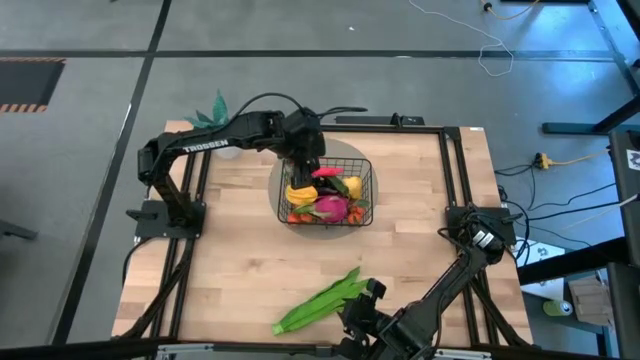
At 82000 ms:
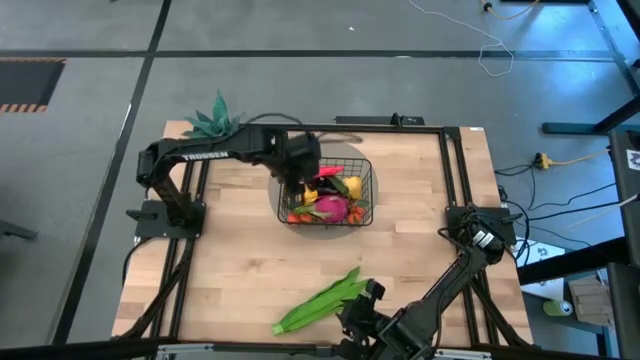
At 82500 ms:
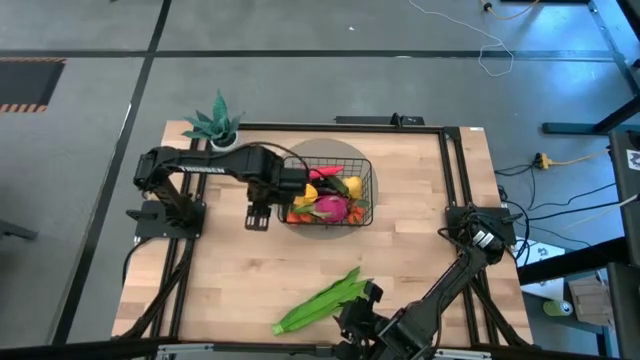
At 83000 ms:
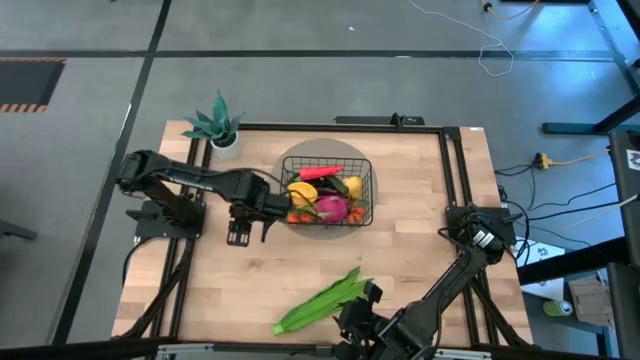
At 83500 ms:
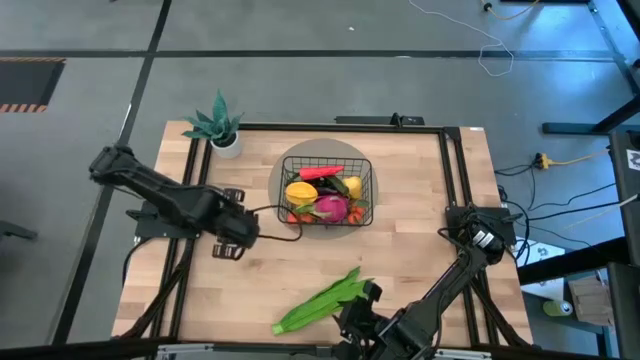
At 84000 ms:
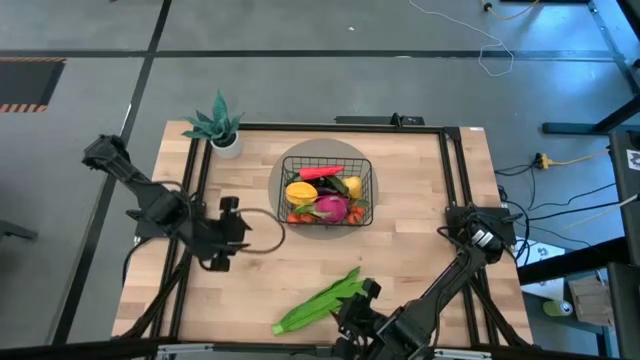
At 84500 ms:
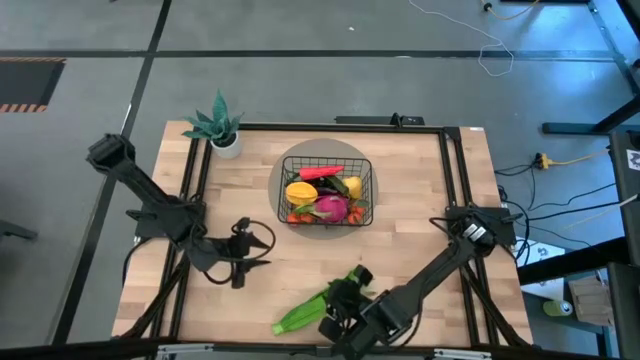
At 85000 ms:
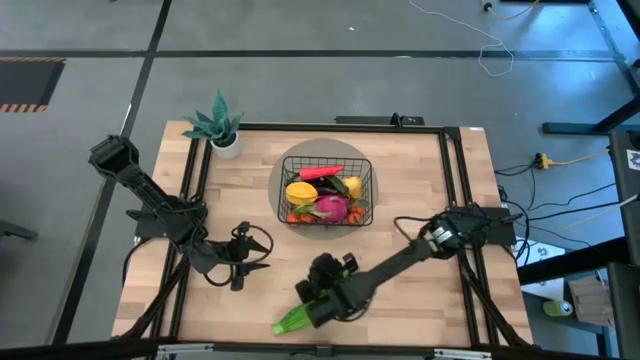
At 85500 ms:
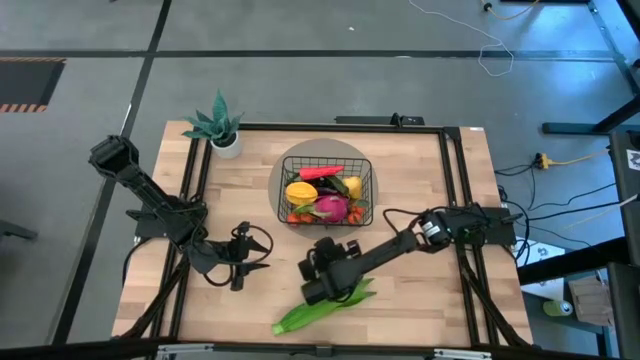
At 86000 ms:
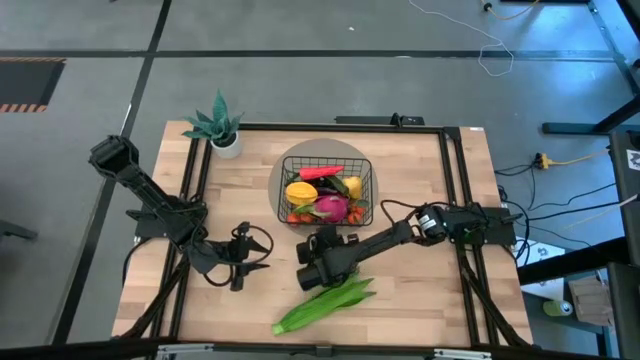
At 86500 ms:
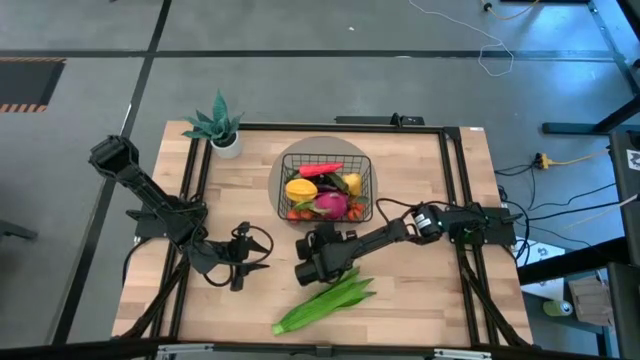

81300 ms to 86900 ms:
Task: Build produce basket
Adjust the black wire basket

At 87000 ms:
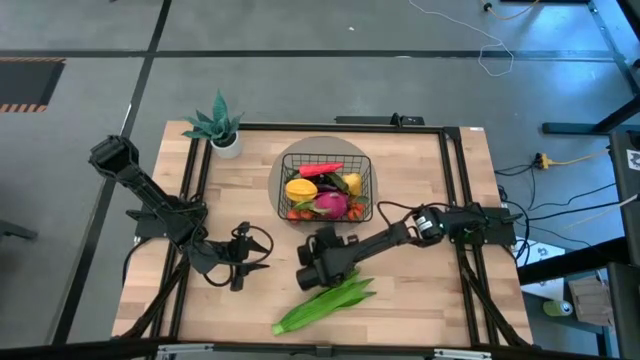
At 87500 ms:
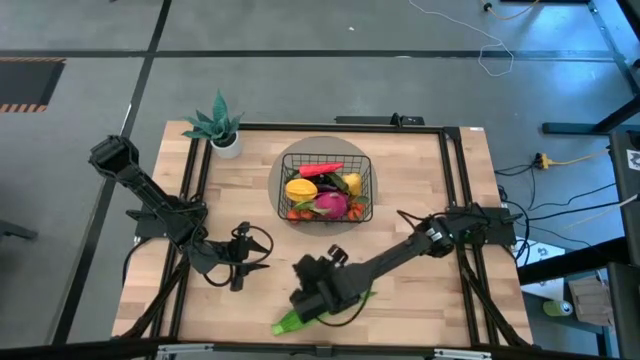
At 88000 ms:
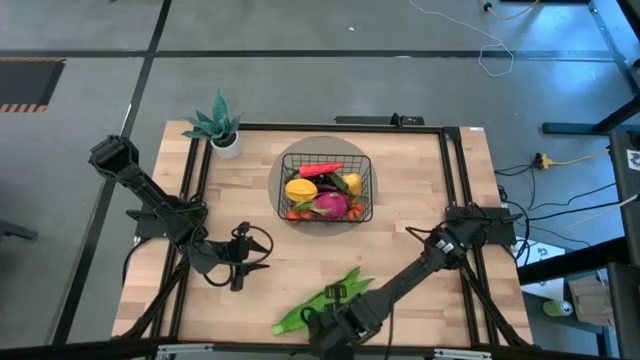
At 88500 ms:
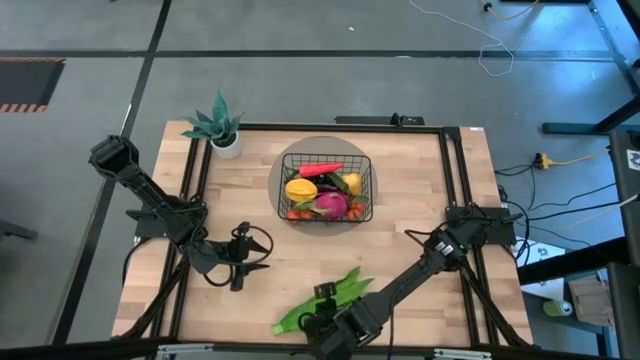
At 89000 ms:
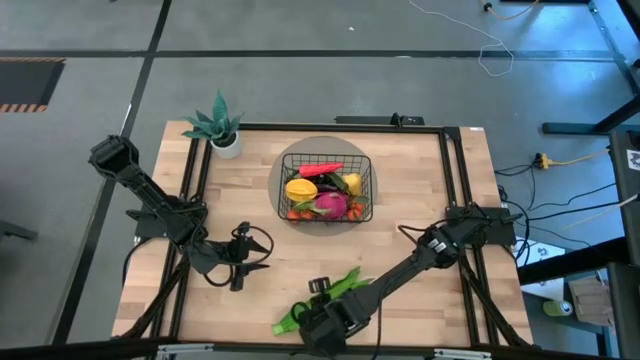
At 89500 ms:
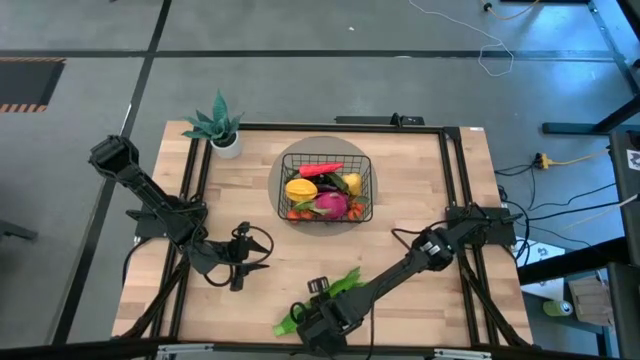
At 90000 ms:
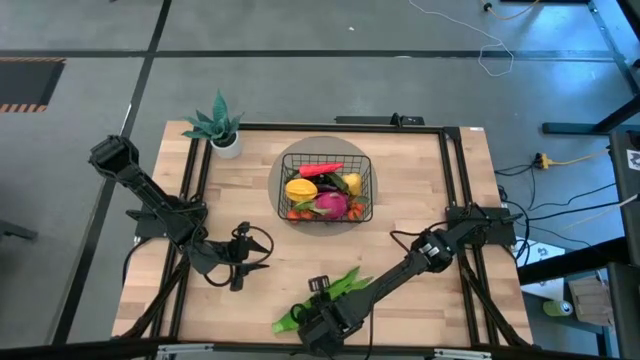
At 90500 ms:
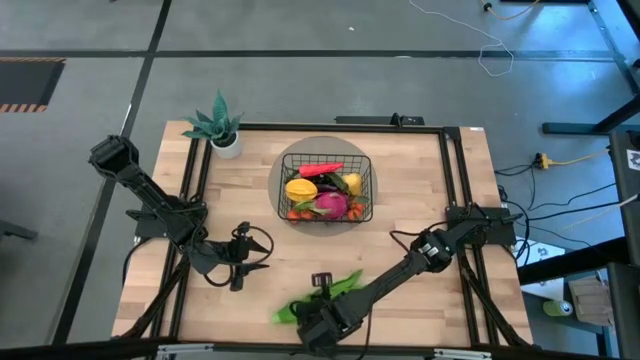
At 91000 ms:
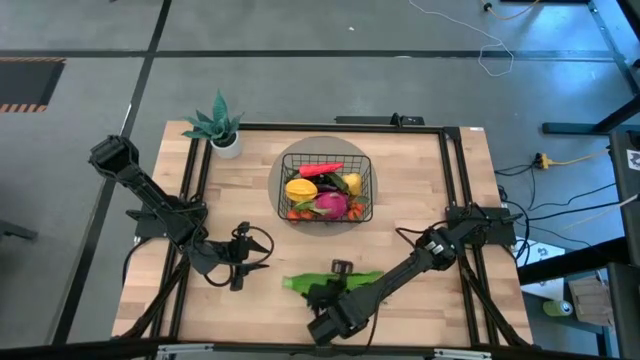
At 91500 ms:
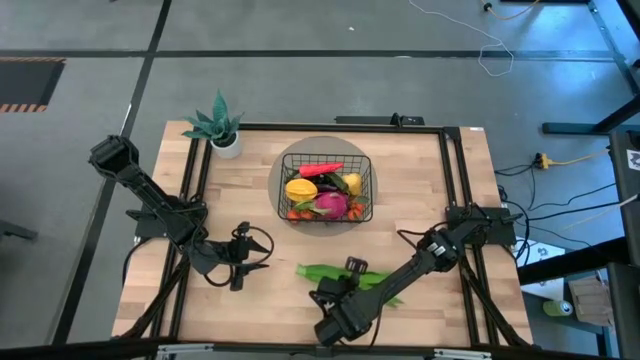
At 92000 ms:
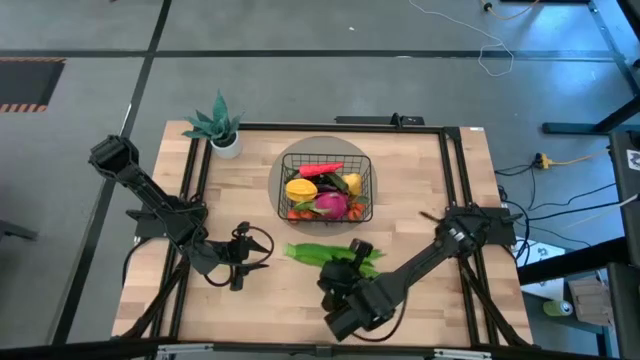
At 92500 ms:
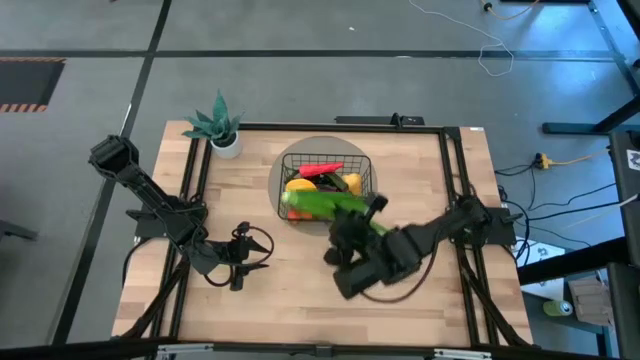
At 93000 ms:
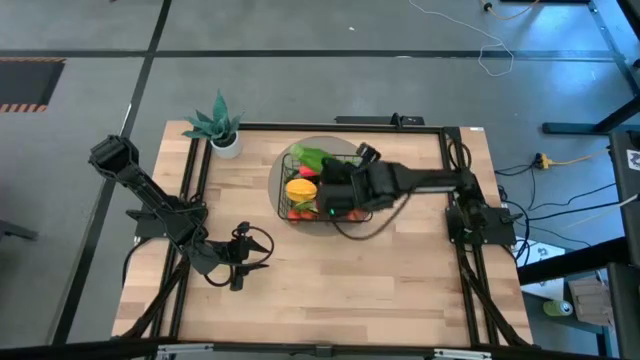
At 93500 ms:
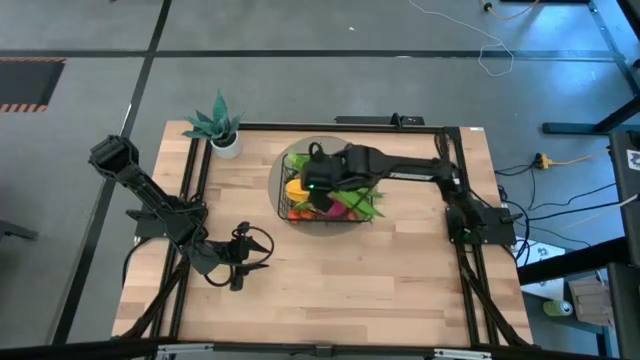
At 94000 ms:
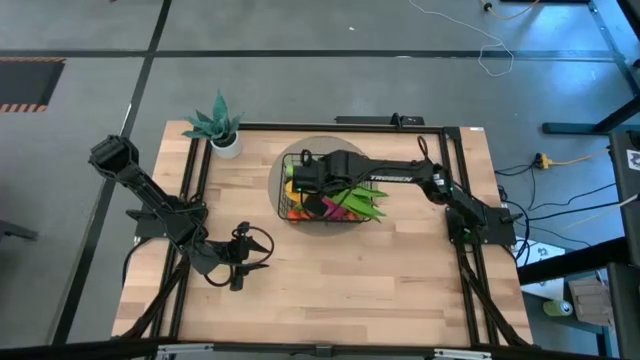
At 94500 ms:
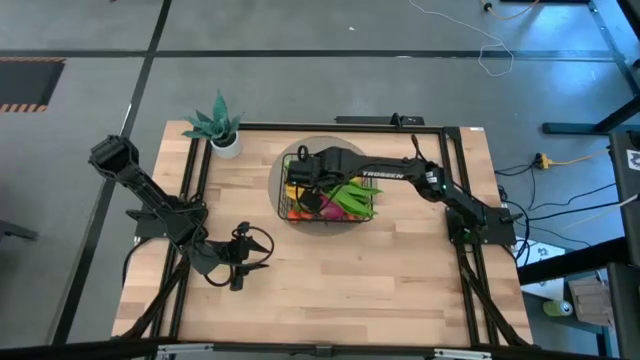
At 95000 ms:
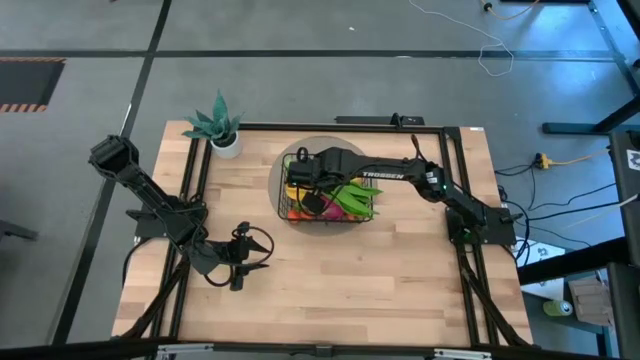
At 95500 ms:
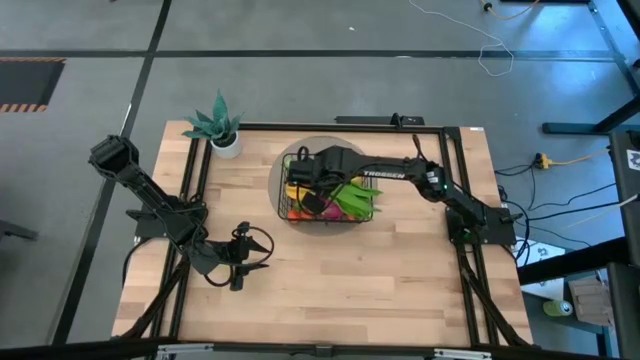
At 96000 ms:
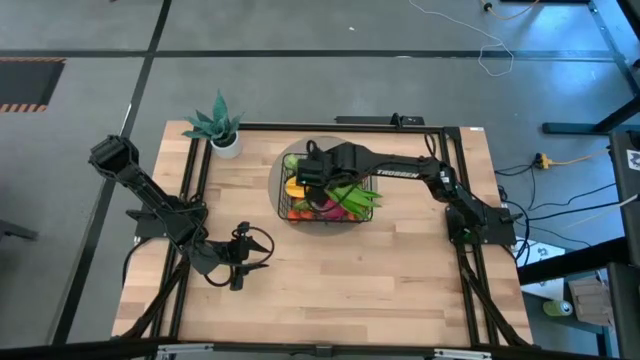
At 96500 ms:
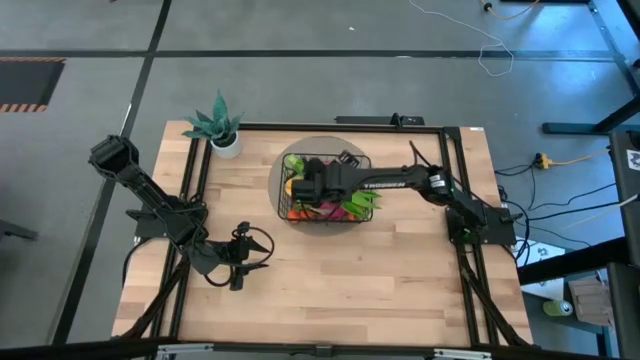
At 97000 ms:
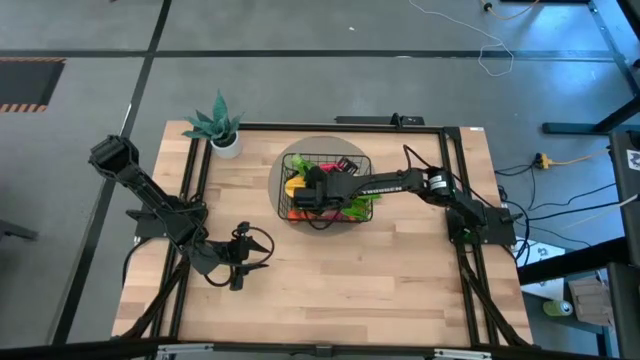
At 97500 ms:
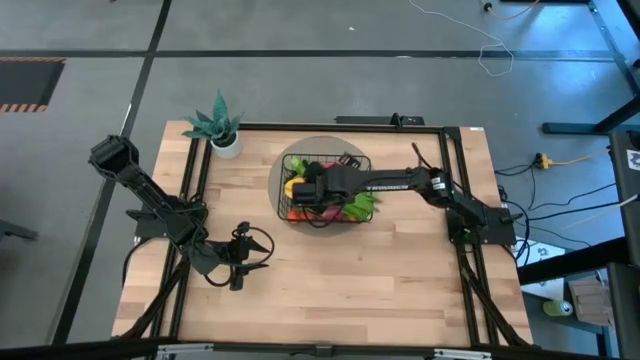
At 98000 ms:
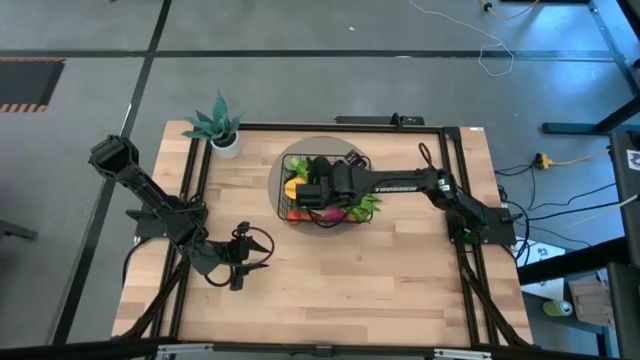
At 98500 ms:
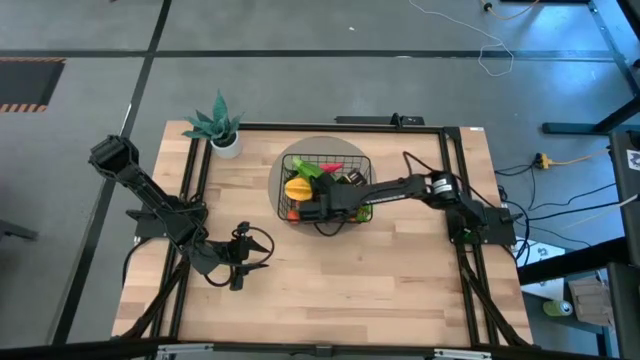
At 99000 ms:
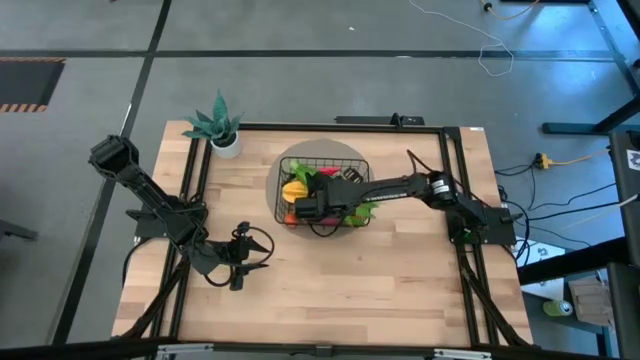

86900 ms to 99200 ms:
Put the lettuce into the black wire basket

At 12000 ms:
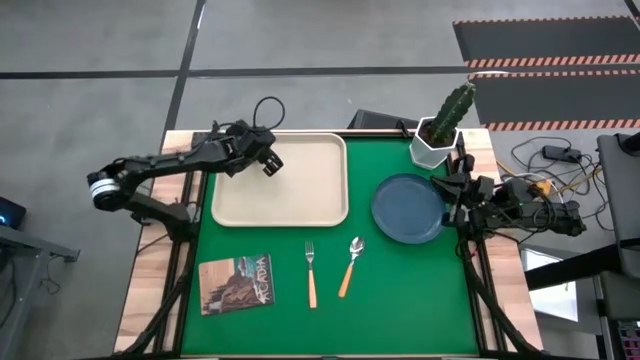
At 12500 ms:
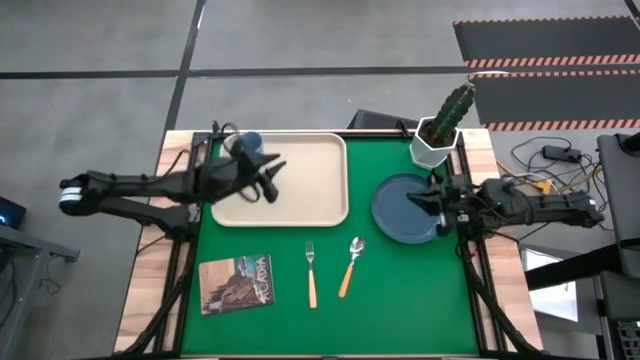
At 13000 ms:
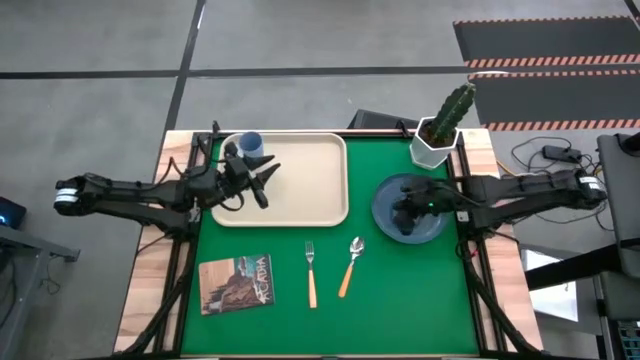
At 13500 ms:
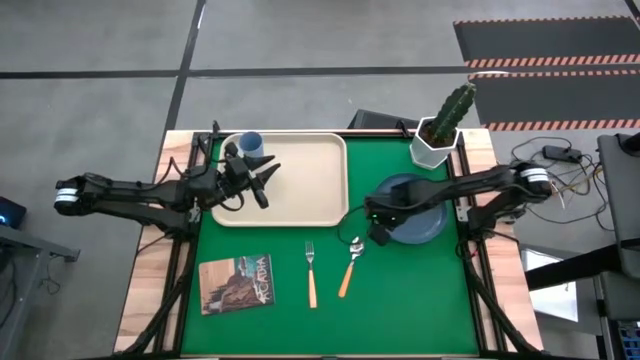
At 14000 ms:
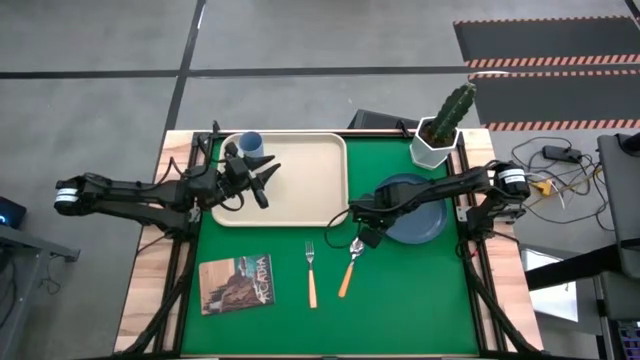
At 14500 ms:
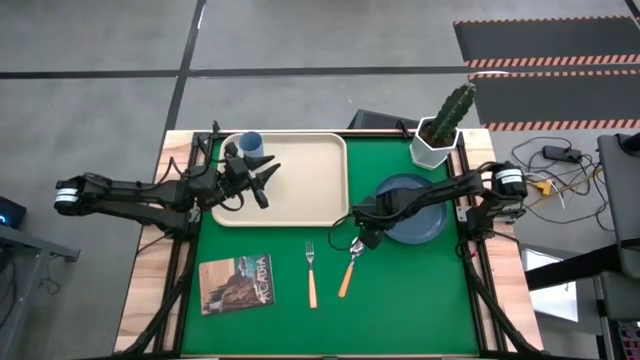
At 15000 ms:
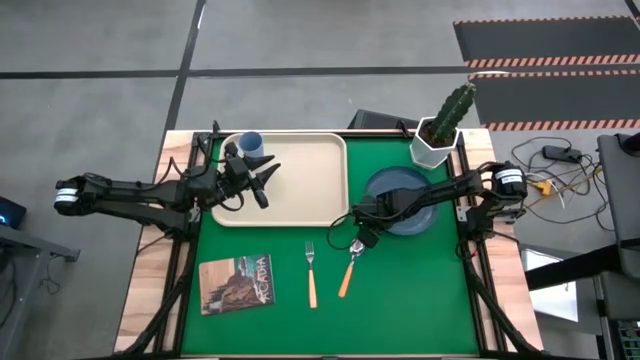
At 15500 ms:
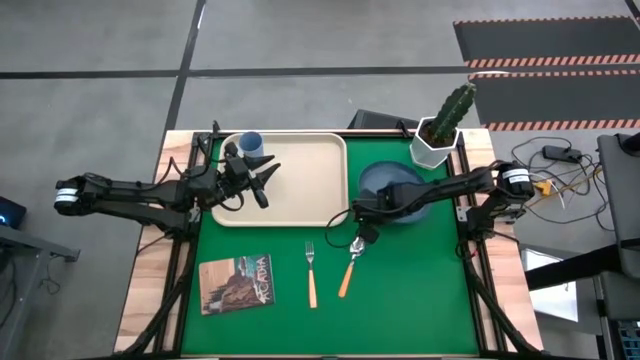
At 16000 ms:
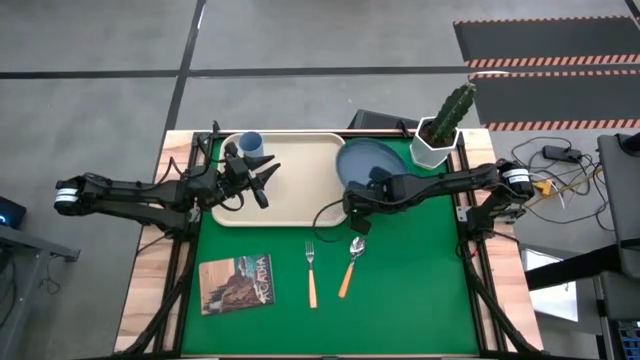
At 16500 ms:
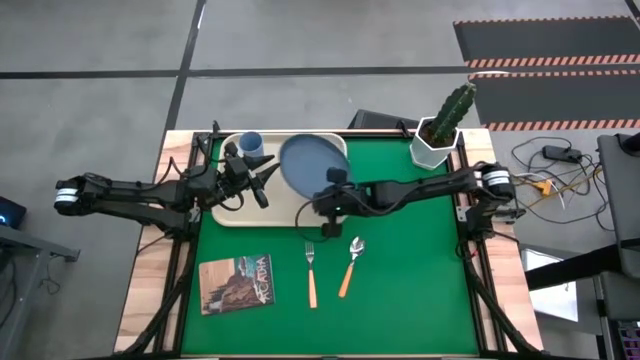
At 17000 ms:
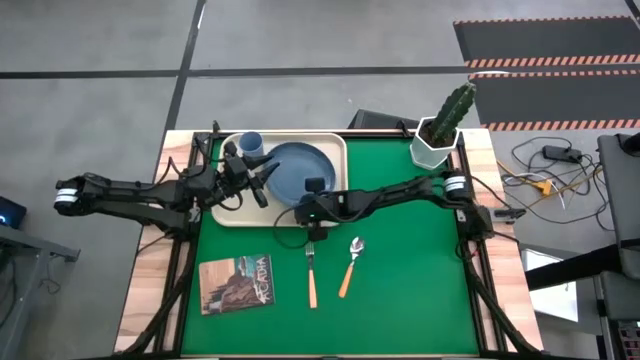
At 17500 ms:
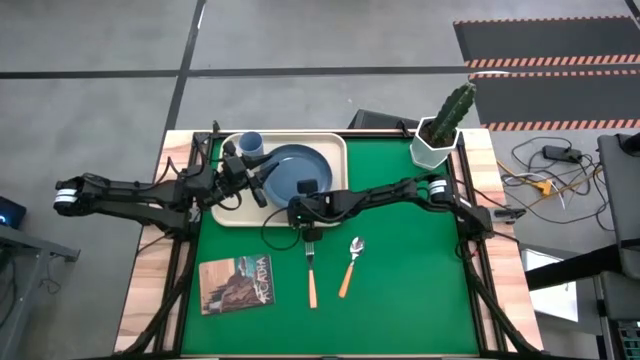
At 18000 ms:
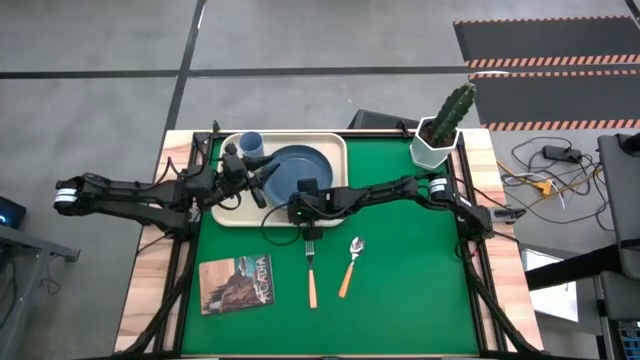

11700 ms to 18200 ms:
Task: Pick and place plate/cup/fork/spoon on tray
Put the blue plate on the white tray to the right of the blue cup
